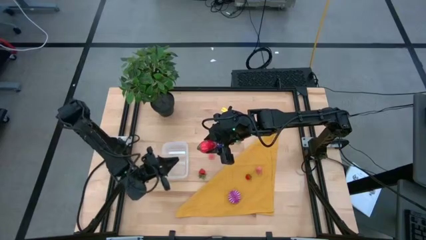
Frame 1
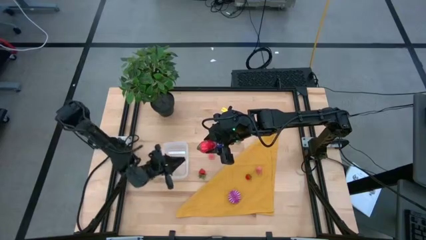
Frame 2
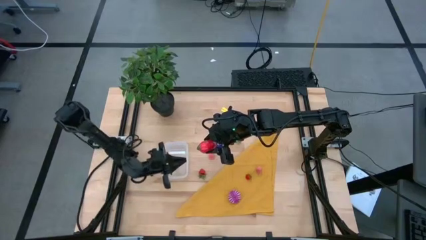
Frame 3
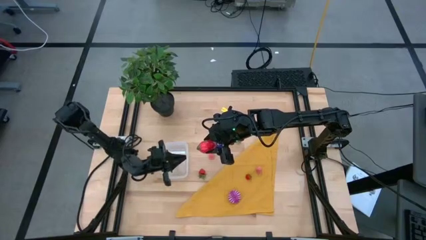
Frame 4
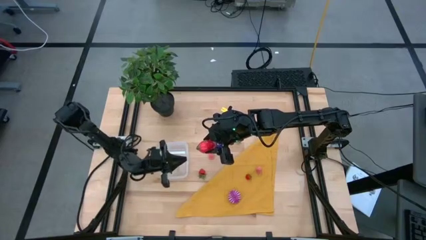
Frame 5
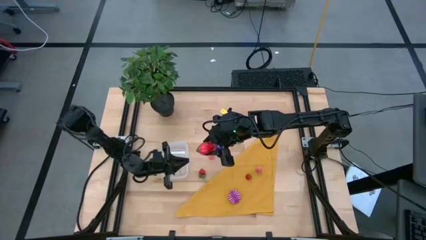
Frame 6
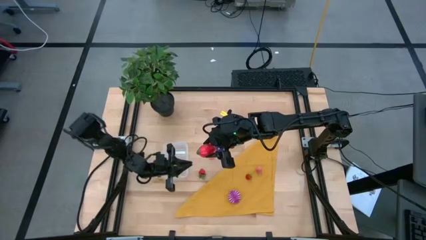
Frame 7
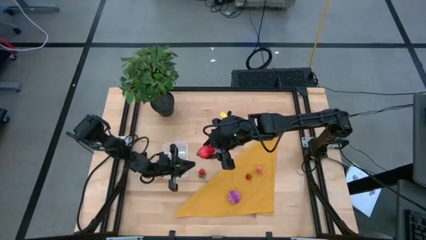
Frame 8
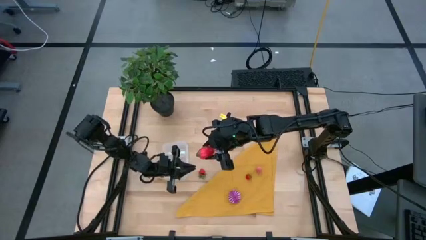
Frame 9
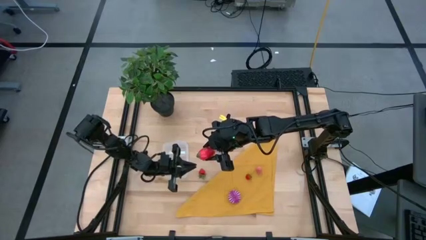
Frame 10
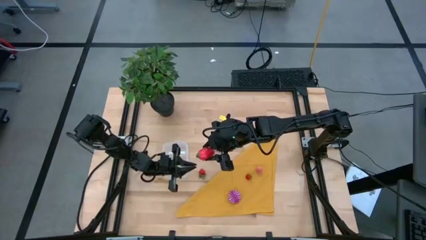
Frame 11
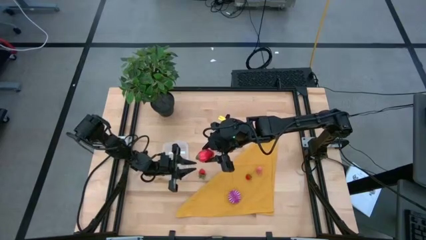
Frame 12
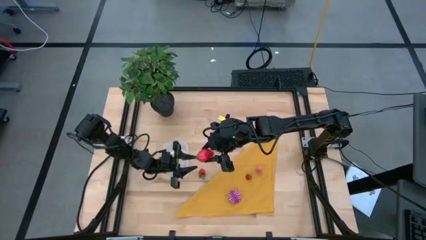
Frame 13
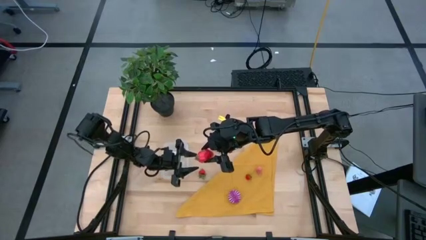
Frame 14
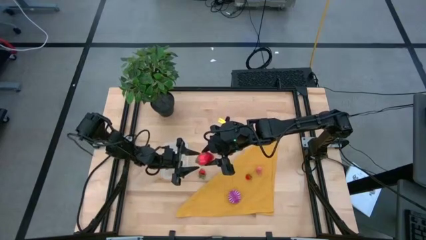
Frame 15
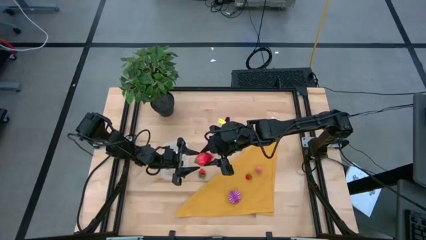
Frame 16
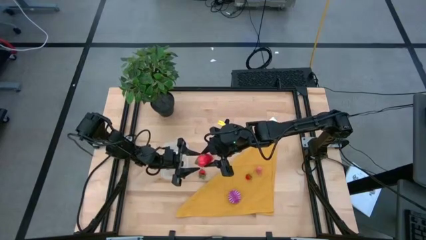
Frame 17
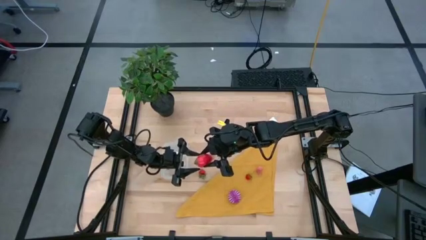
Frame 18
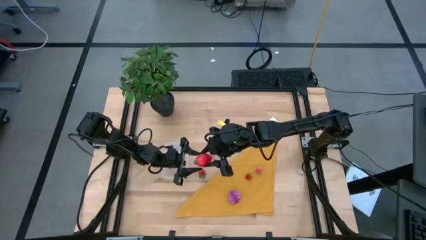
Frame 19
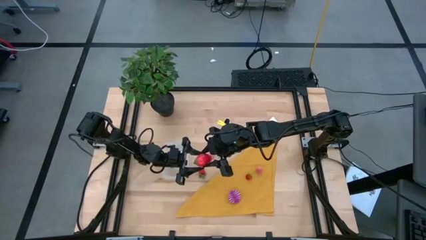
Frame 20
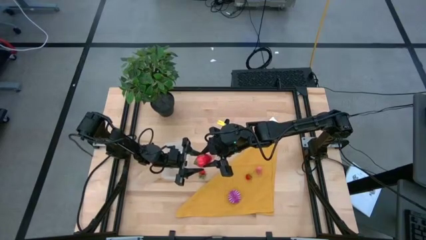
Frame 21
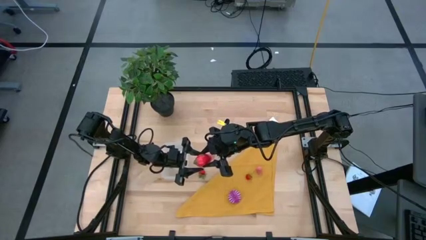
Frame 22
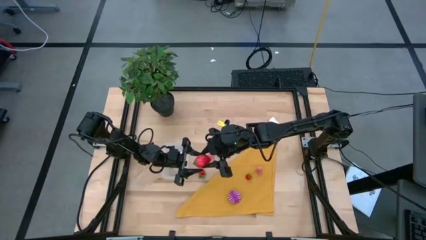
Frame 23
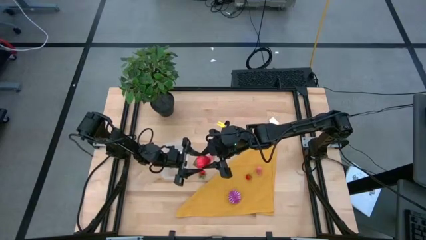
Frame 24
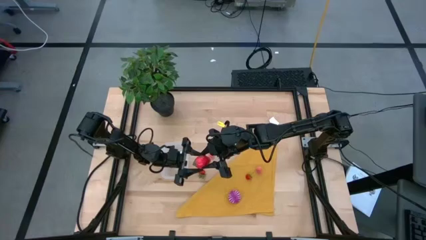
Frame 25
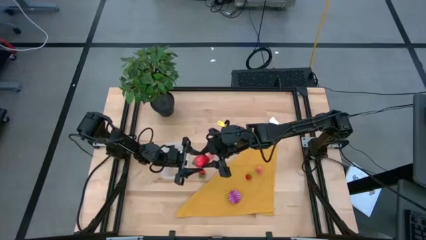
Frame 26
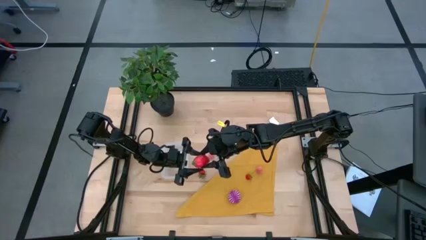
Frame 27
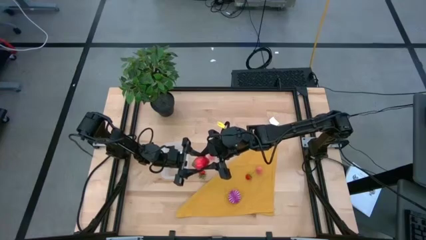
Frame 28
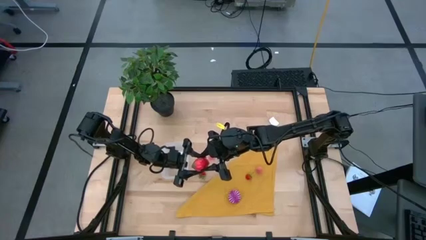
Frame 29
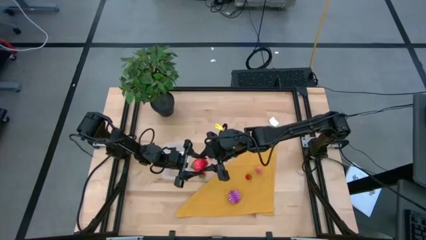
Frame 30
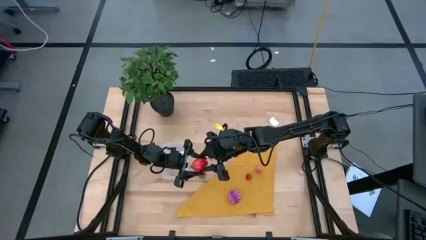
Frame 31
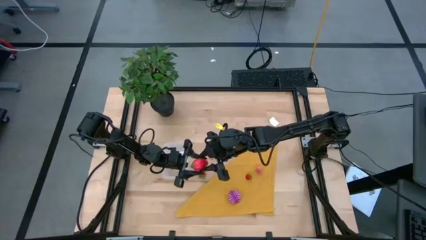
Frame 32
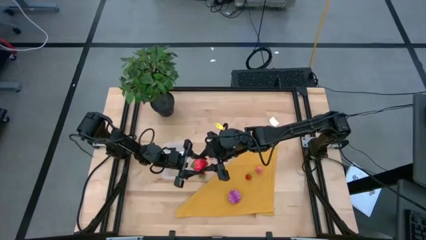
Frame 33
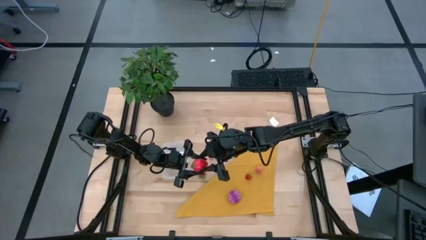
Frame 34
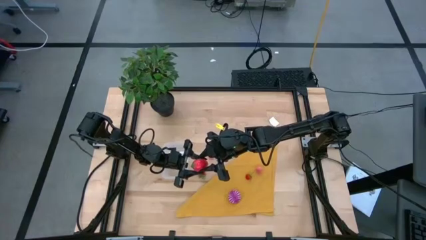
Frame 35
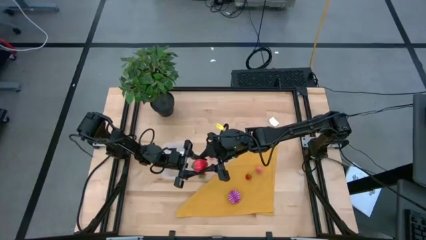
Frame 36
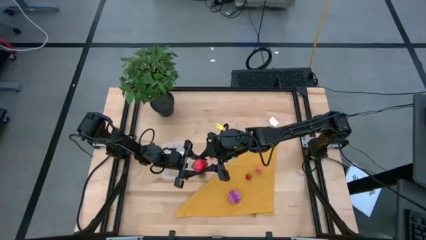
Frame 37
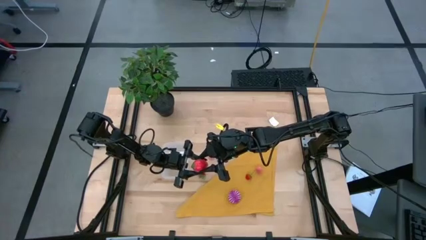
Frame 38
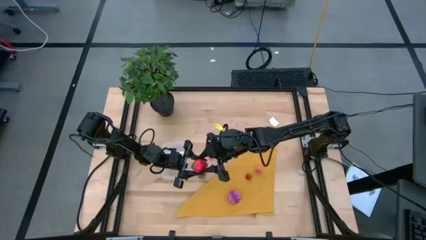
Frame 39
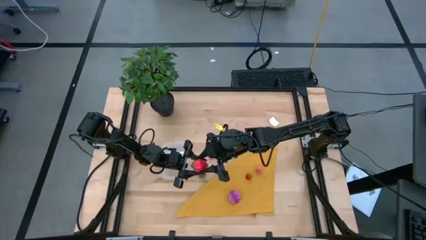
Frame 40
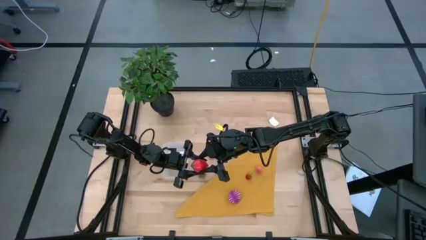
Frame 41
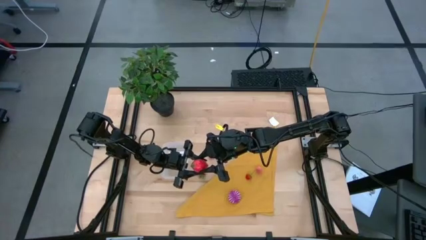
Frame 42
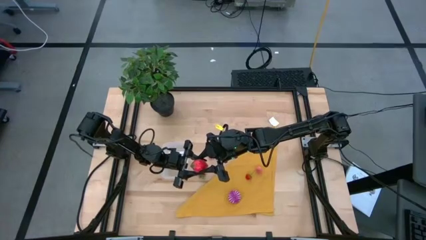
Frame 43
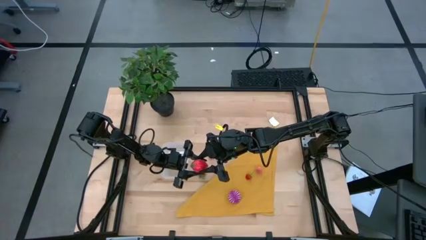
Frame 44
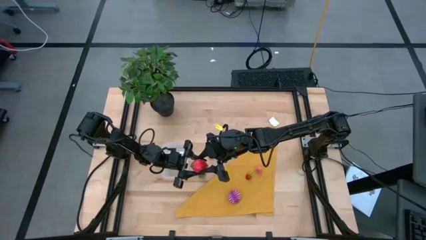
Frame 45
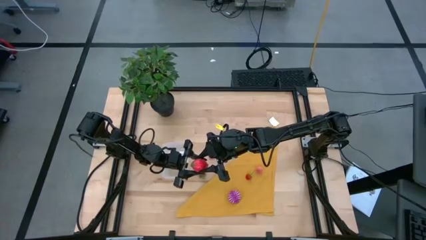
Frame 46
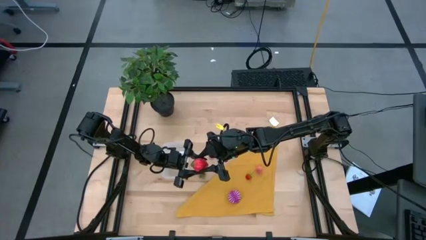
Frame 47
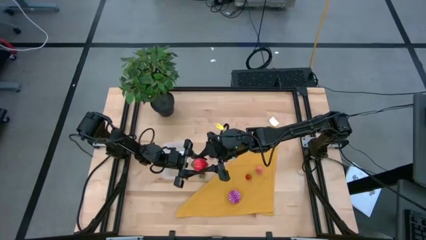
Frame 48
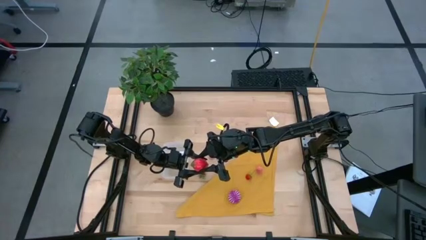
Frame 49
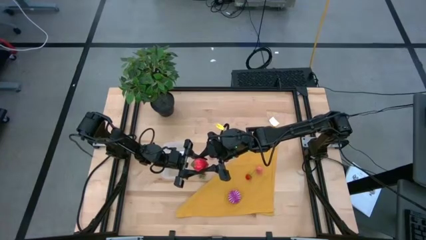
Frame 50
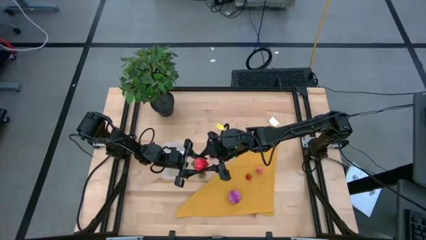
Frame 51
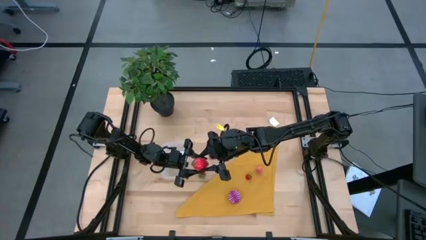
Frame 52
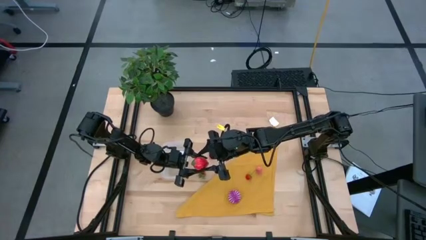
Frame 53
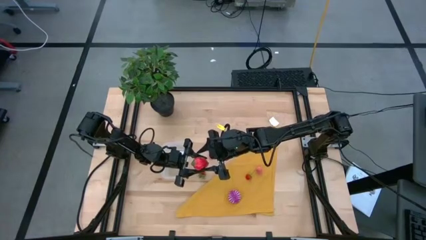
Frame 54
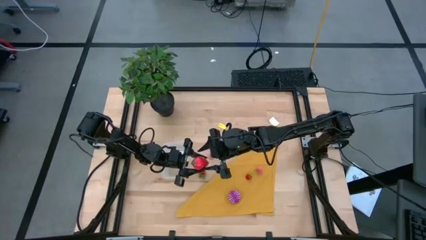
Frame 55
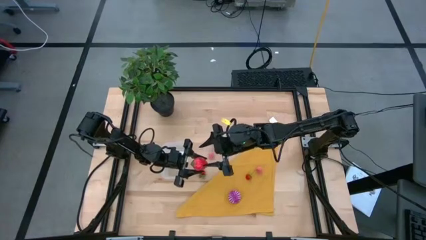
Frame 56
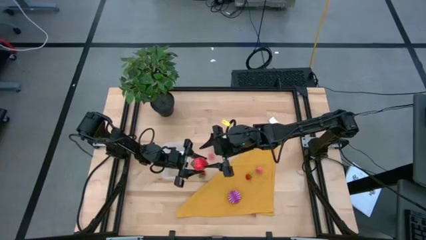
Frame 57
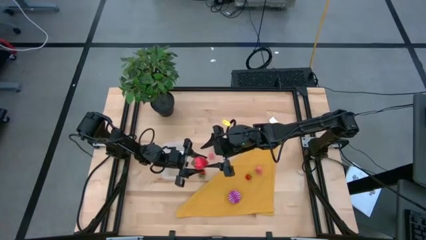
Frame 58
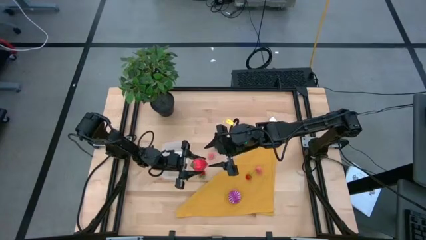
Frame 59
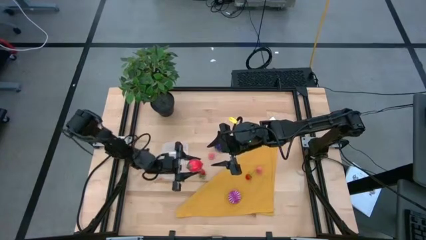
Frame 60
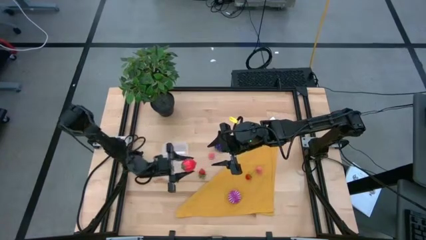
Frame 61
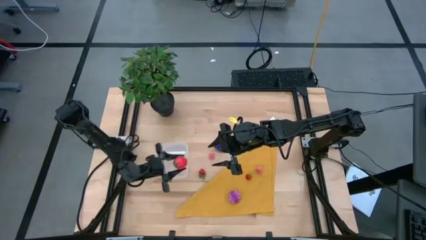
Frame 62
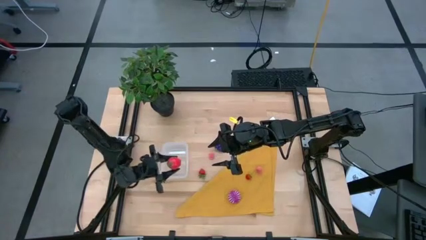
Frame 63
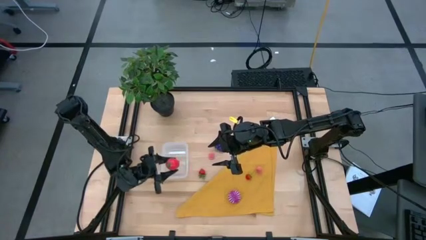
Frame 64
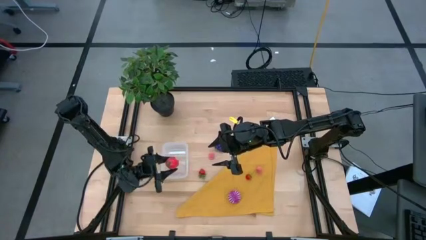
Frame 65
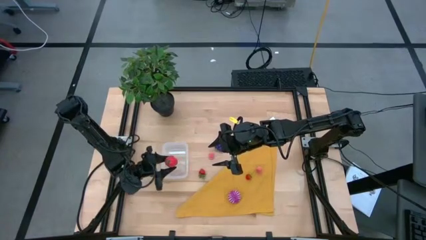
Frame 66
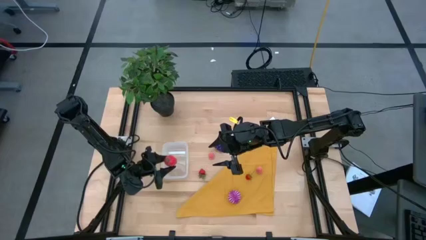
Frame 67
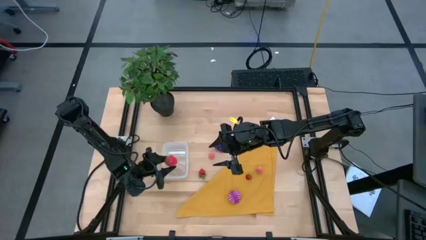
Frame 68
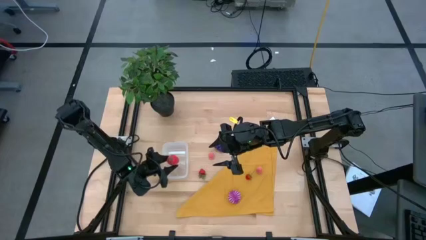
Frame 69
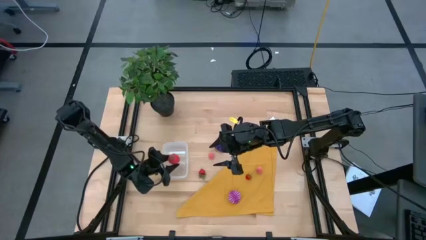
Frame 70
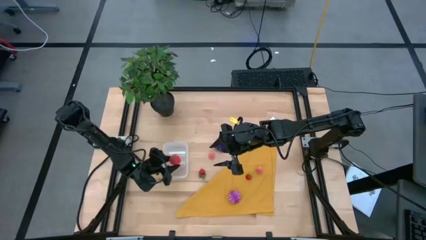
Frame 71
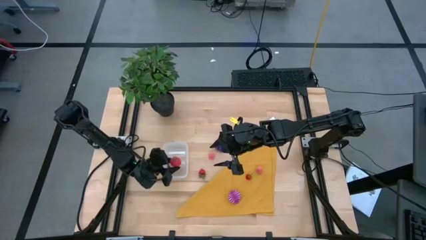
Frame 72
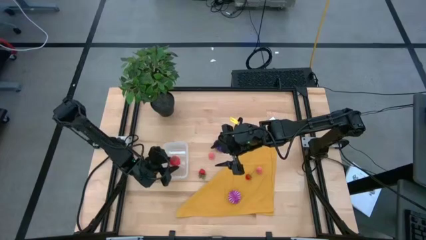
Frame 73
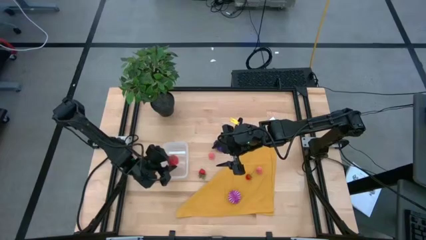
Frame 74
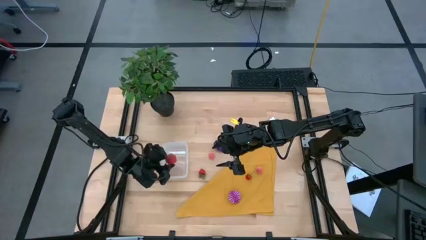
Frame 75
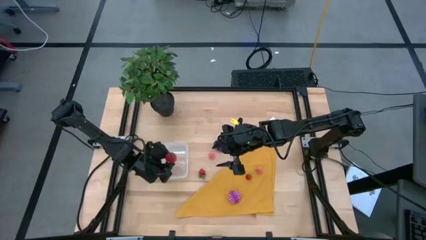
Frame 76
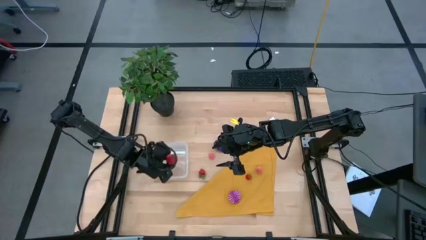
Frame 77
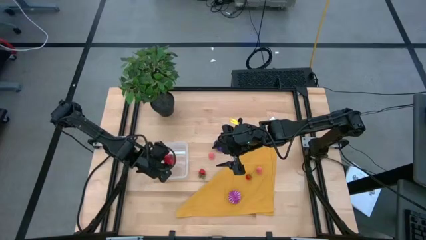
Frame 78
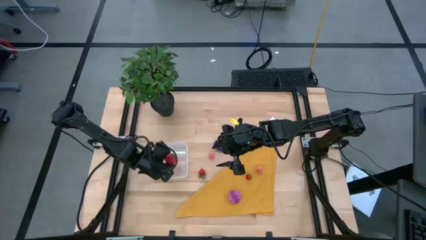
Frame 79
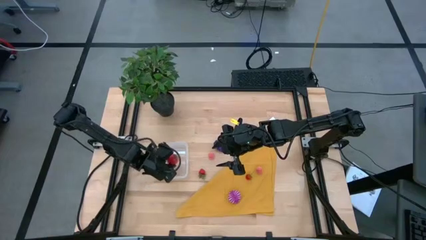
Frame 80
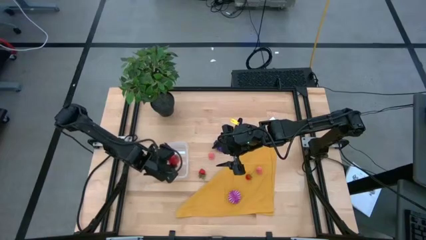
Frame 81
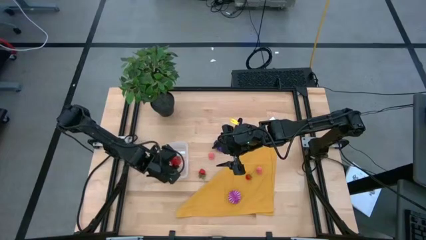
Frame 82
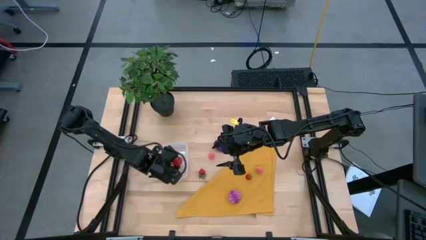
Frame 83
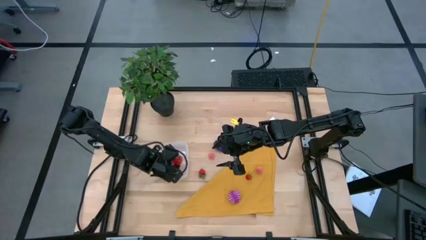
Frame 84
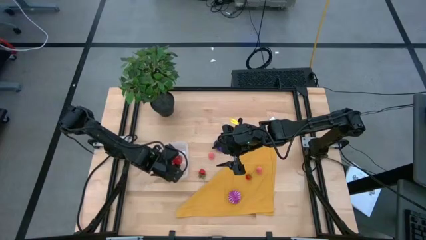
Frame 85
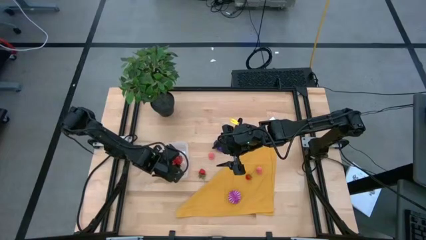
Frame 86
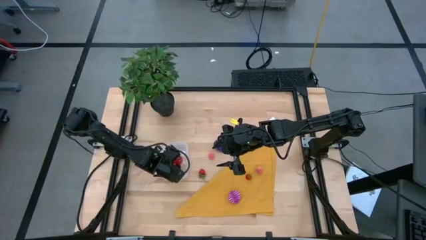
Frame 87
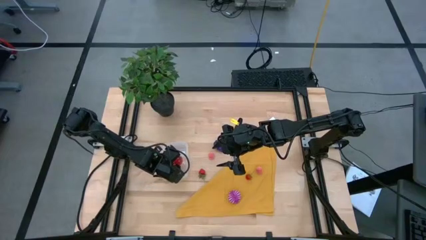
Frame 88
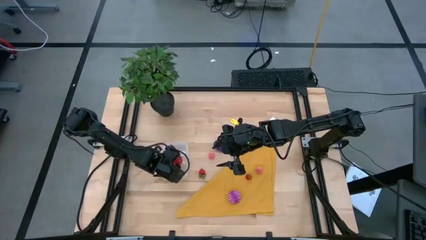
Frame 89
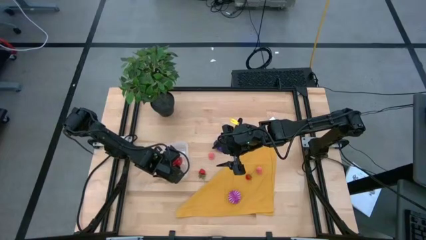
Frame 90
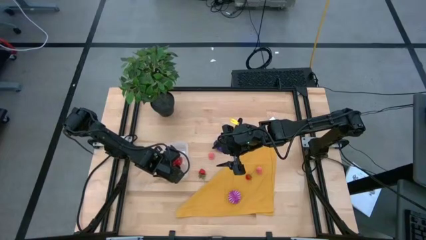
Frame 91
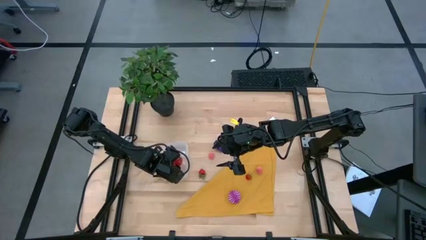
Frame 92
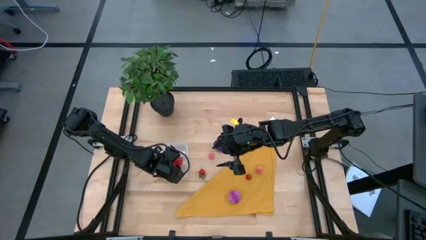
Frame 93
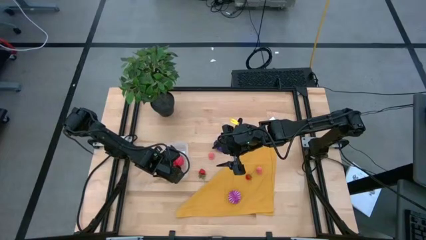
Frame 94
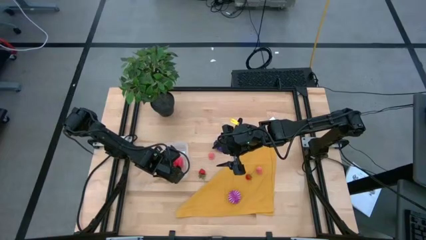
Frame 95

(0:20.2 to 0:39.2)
Task: Pick and placing Produce into tupperware
Put the pink dragon fruit into the transparent bin
